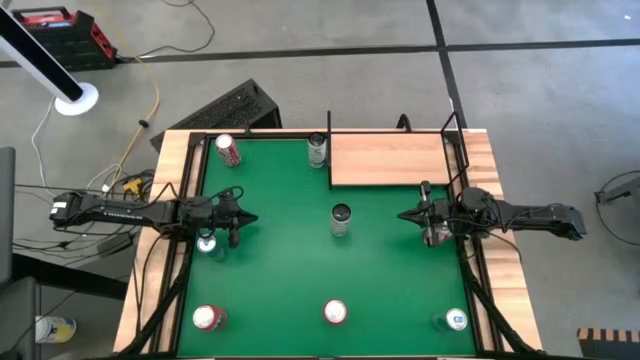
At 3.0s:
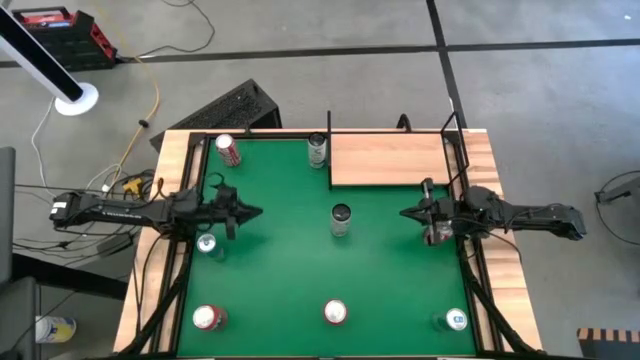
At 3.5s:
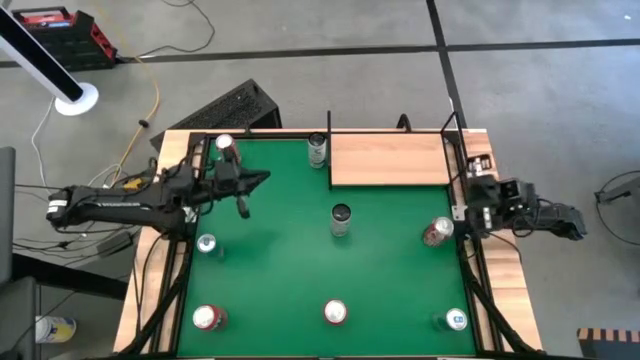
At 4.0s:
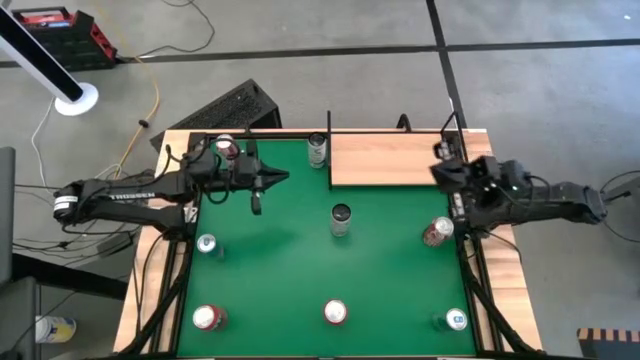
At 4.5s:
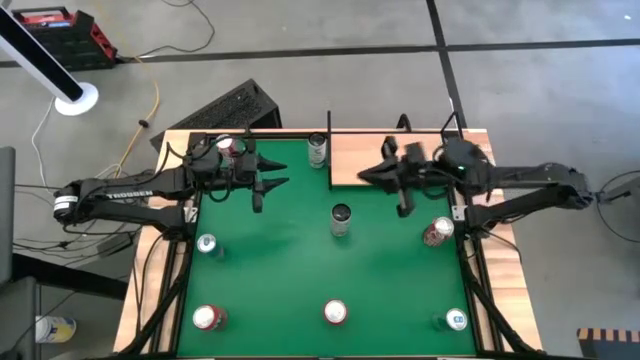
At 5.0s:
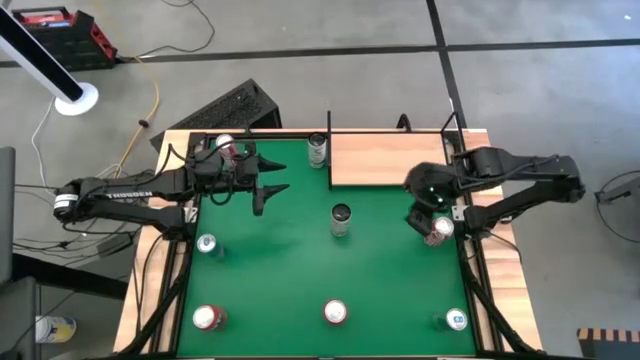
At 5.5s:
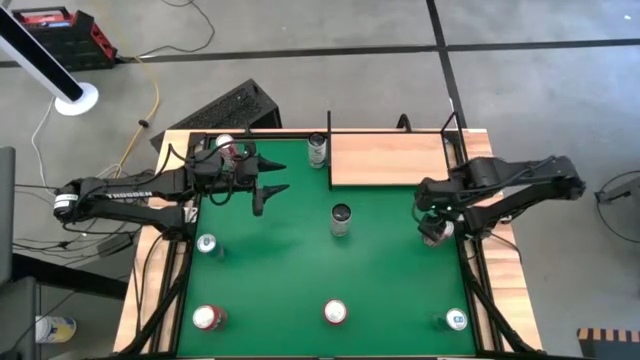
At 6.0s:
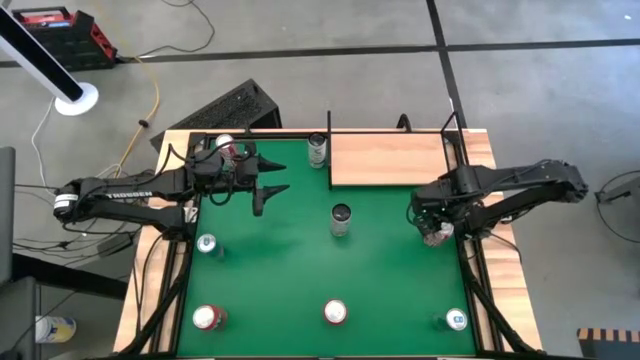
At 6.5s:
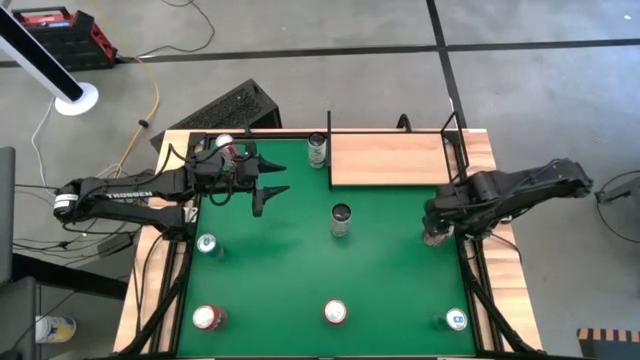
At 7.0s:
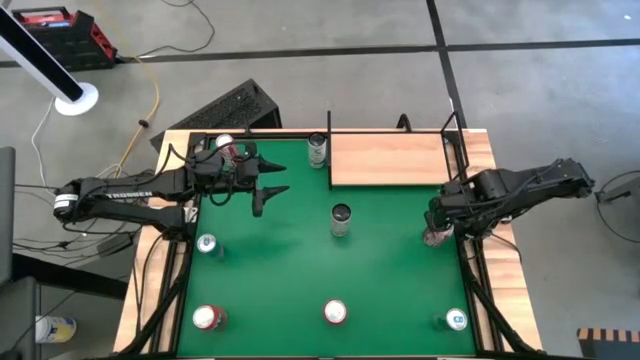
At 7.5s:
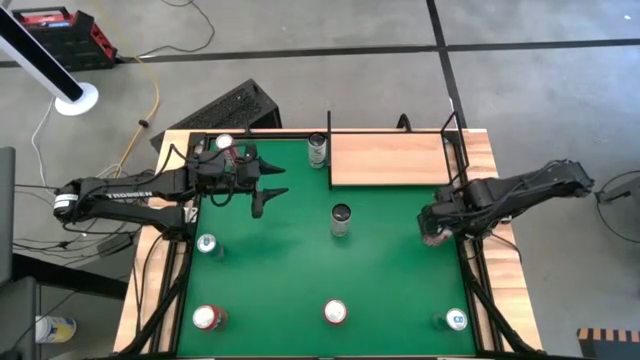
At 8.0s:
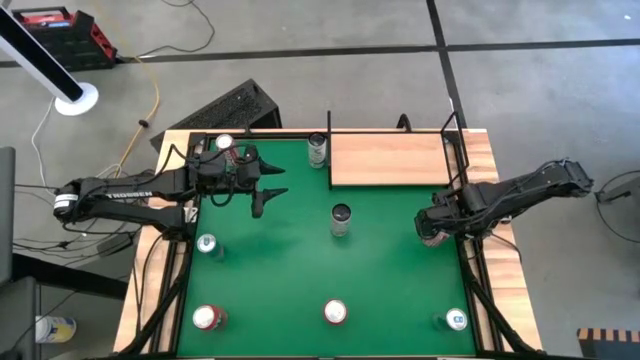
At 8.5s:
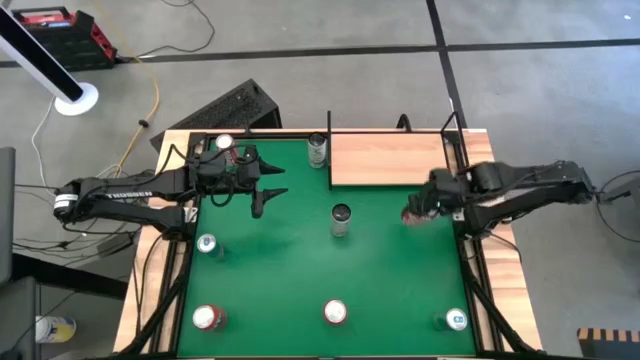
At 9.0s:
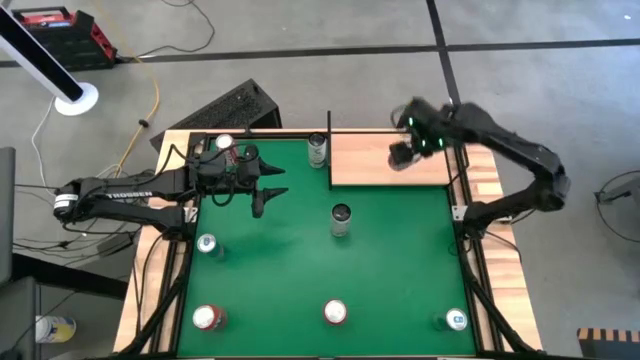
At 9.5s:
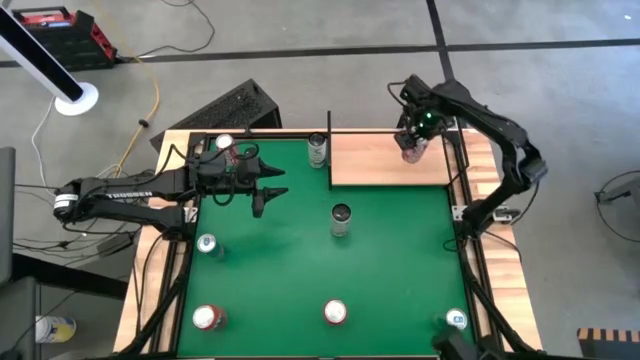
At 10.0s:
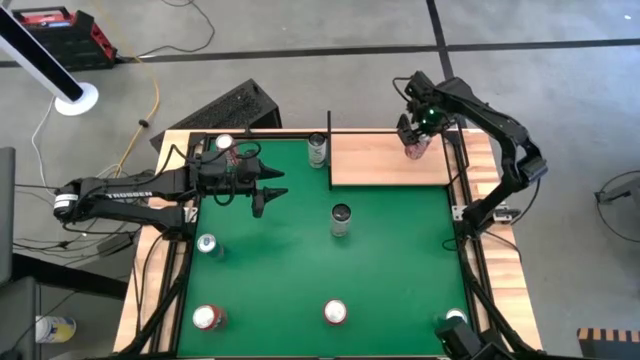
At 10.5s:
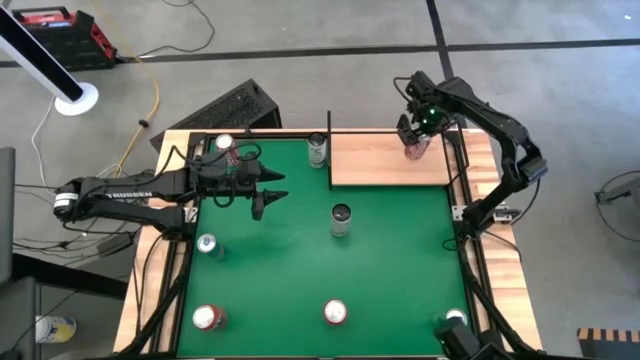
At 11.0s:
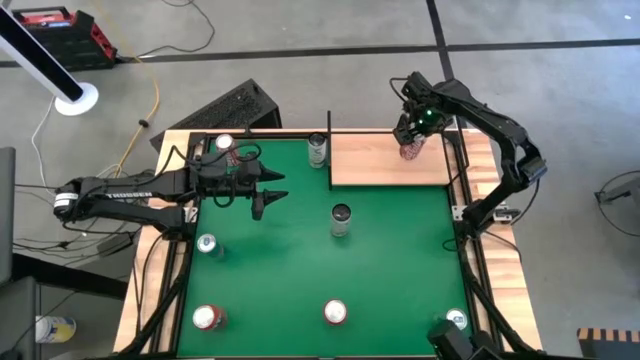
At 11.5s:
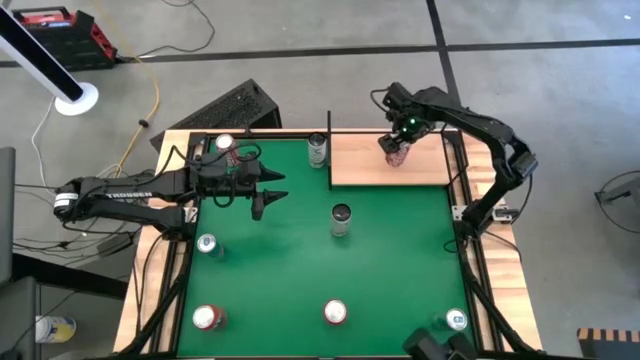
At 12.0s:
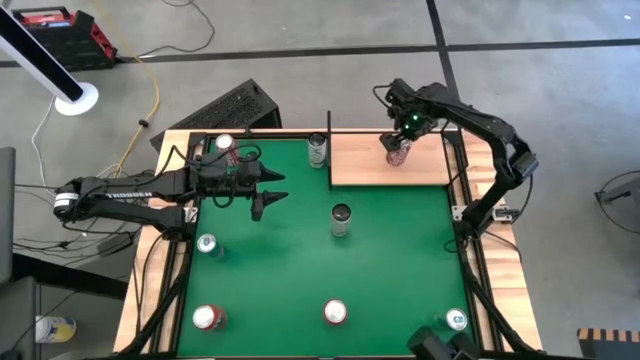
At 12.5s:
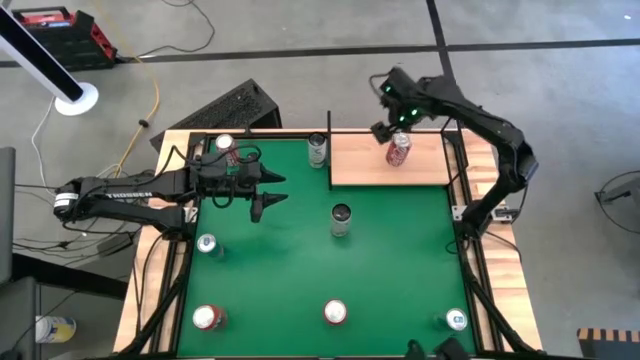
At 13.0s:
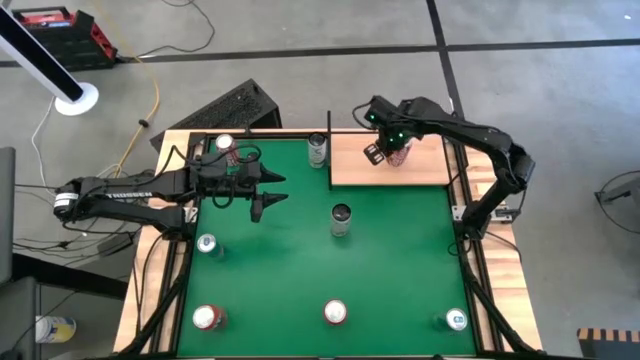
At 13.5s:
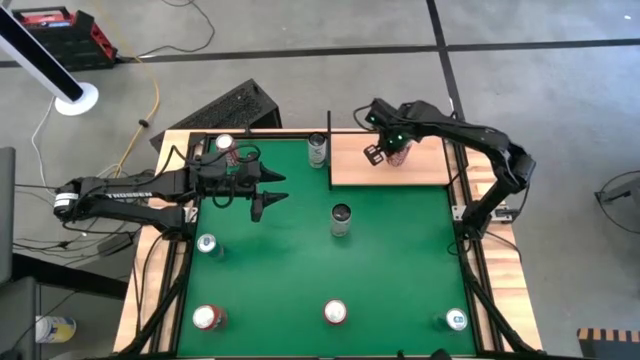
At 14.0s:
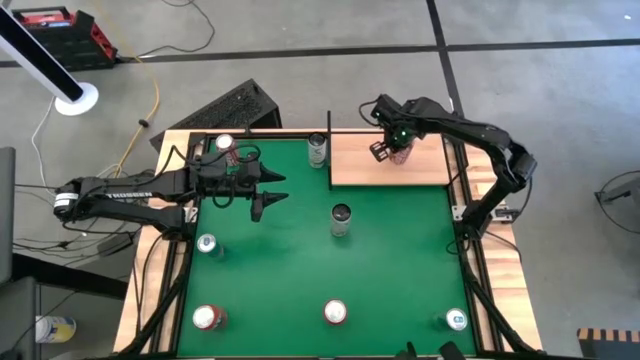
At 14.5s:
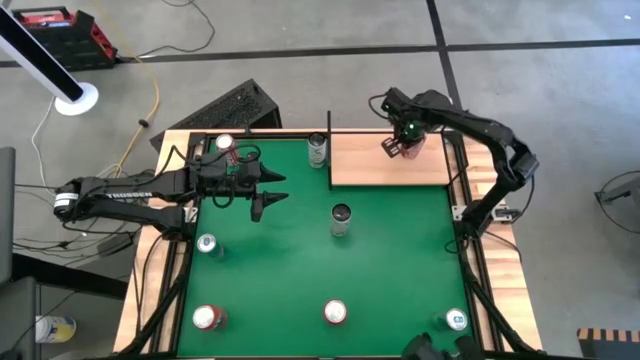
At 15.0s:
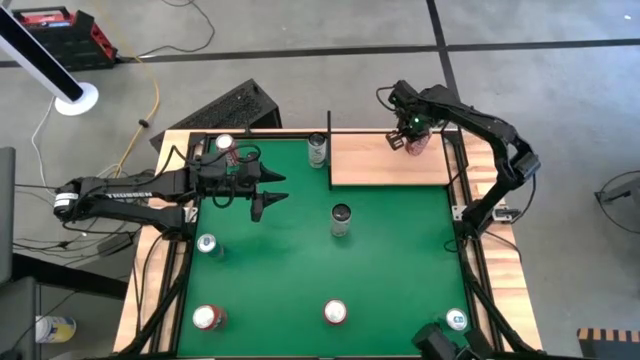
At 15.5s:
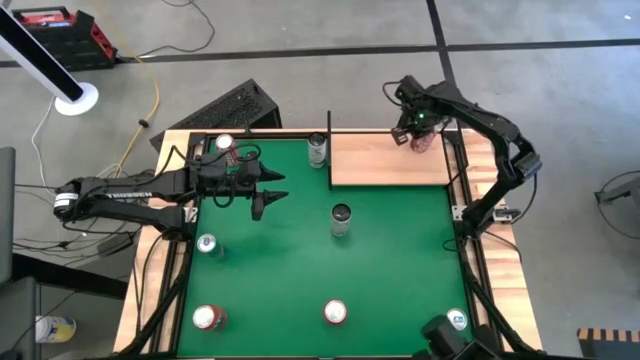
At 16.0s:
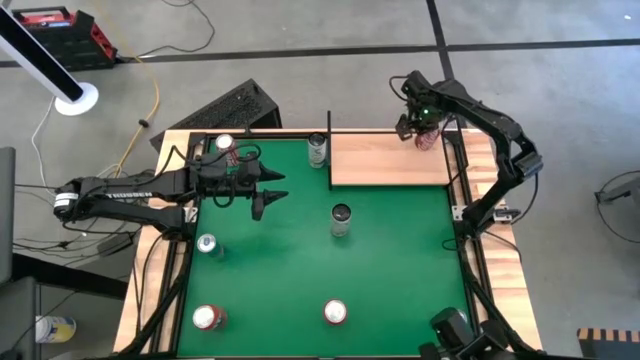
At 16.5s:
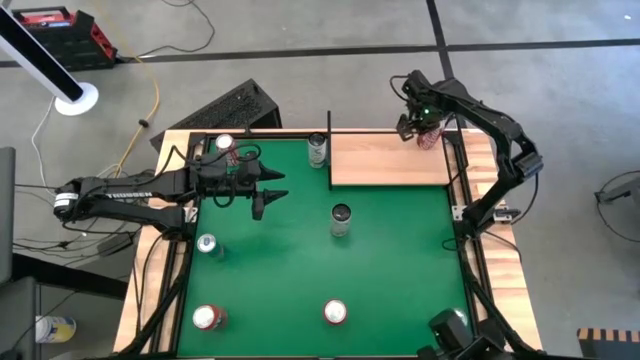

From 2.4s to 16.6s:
Task: Place canned beverage on shelf
Put the bottom red soda can on the shelf
